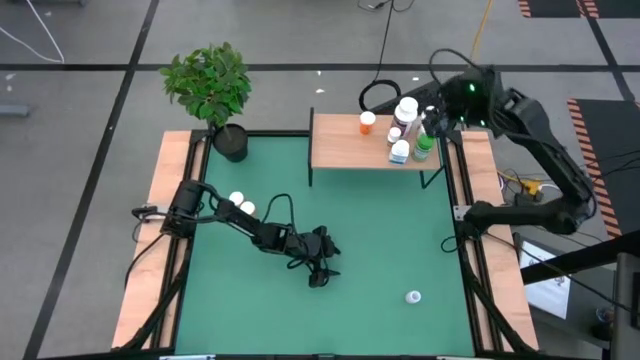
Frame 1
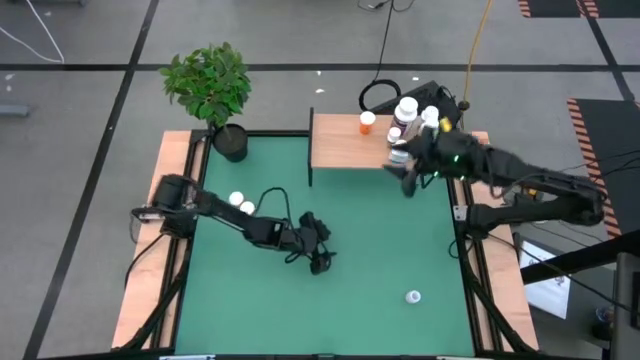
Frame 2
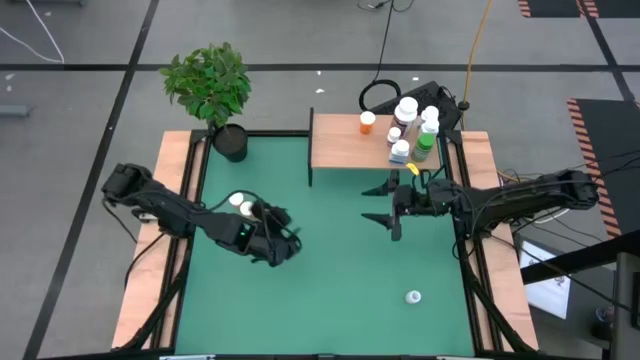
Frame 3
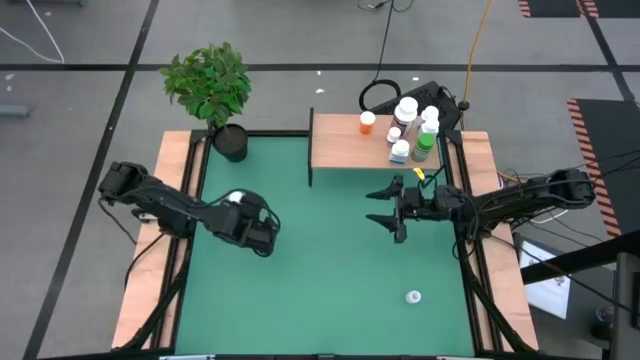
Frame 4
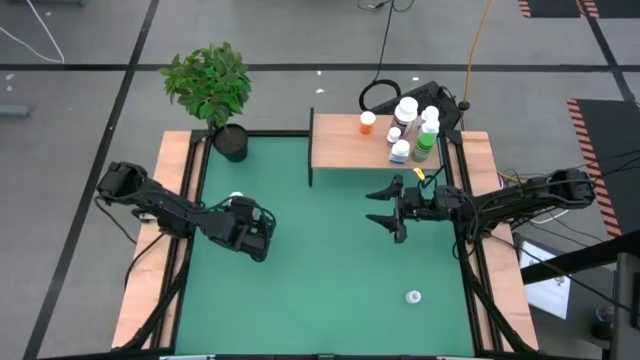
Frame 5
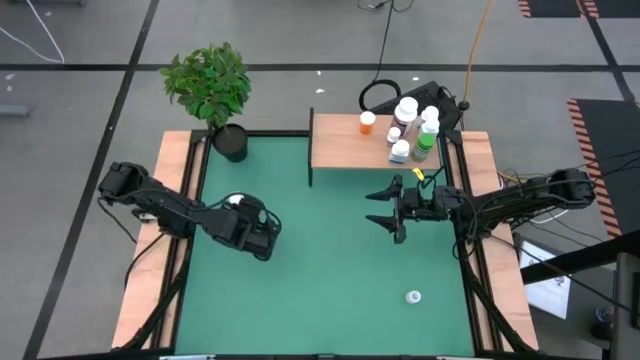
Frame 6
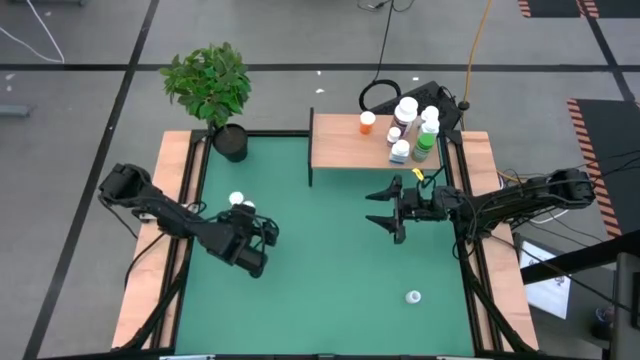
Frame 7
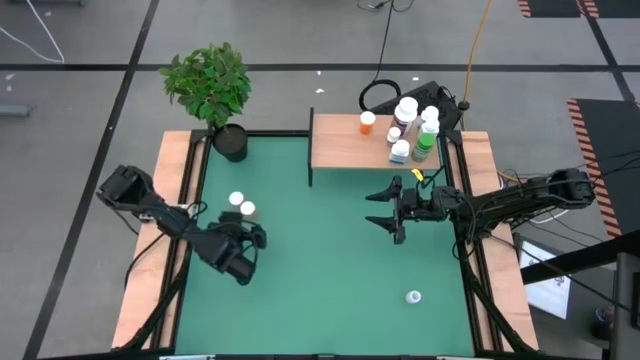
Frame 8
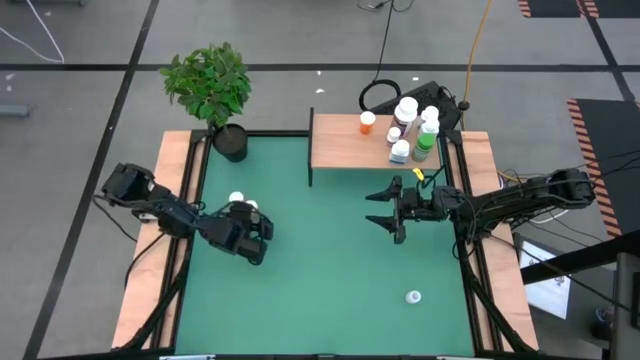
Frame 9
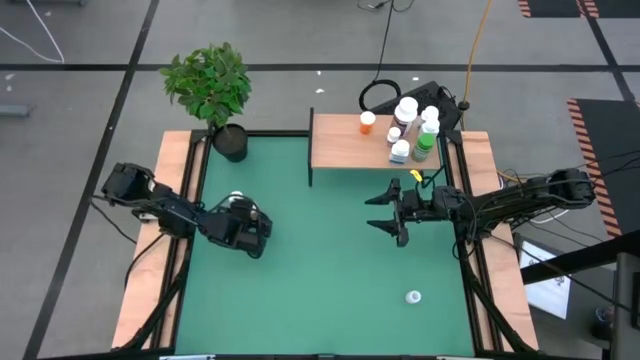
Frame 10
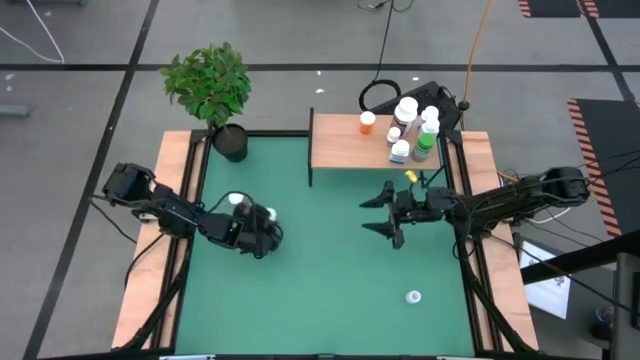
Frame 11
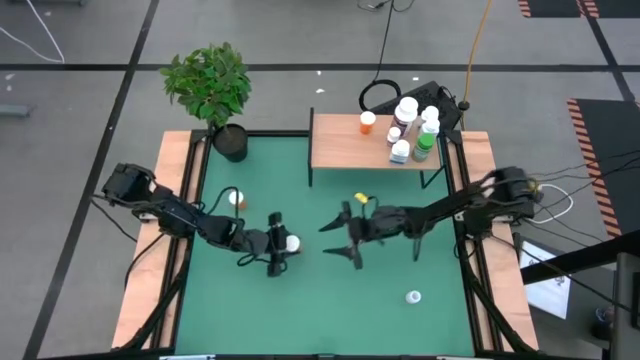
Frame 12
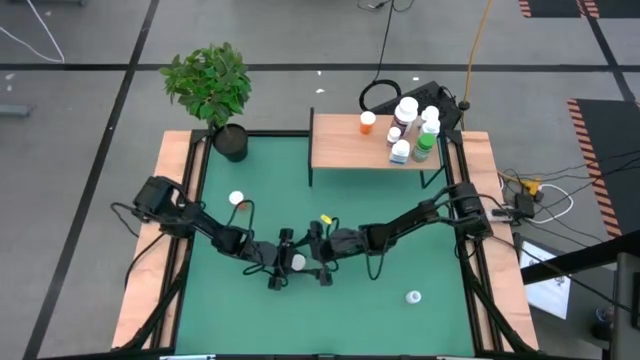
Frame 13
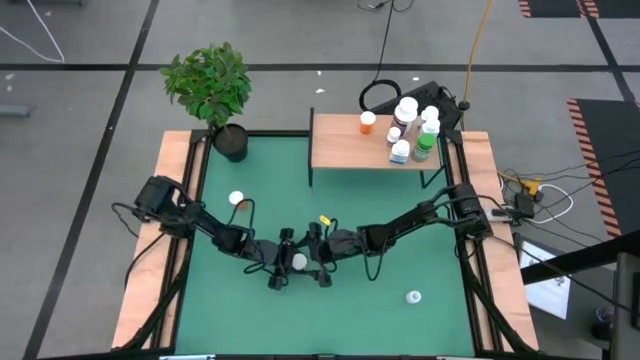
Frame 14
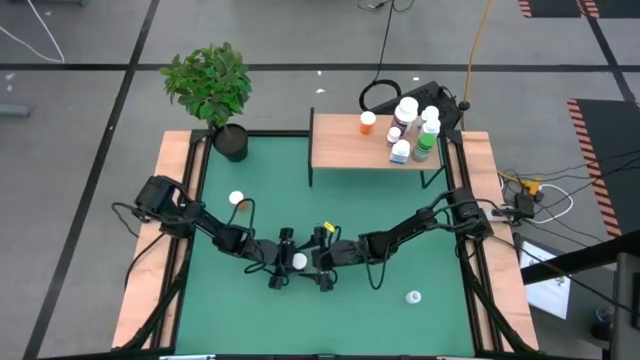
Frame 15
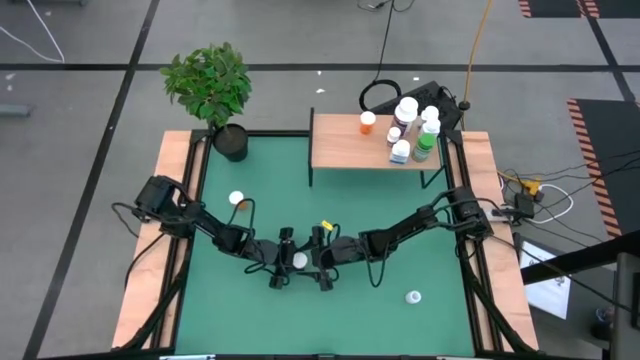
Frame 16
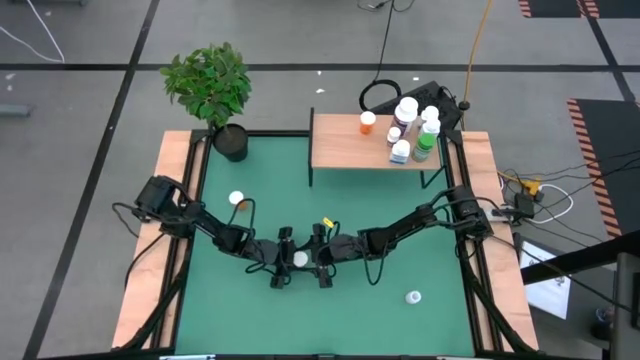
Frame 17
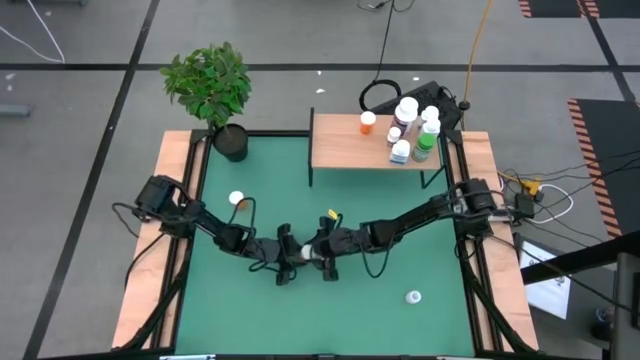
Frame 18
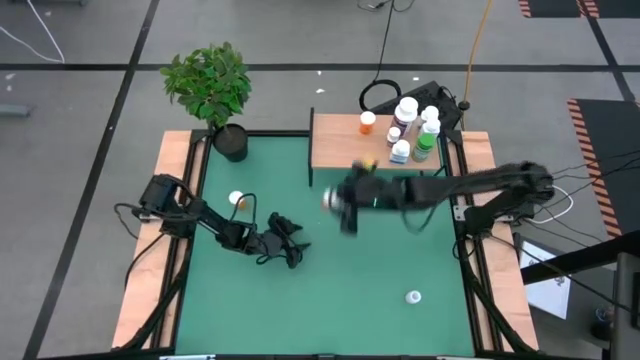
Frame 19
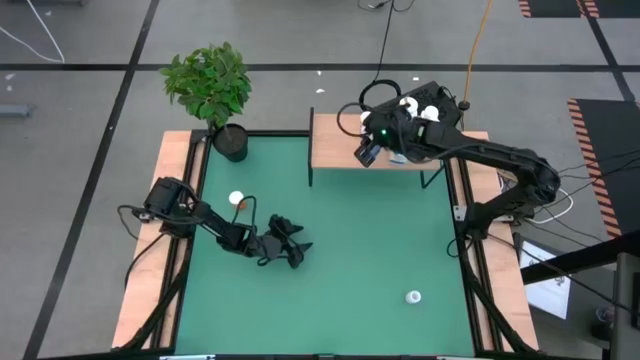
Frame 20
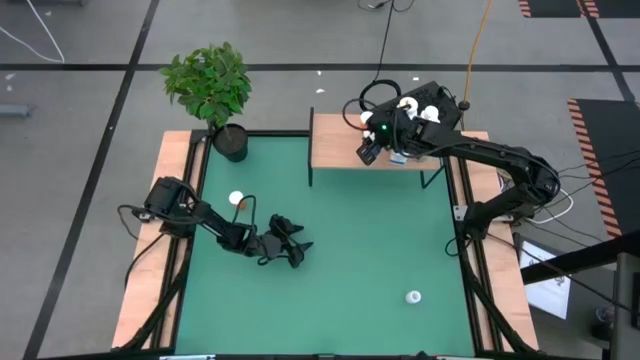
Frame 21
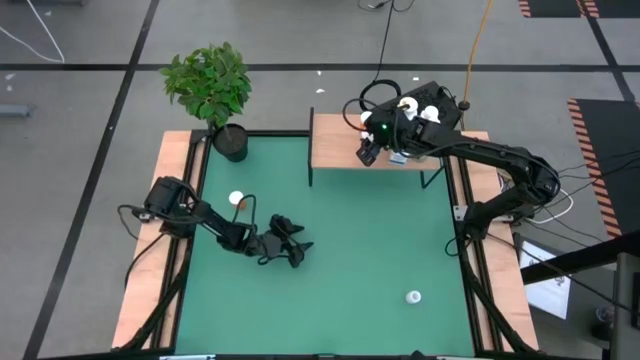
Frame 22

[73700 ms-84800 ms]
Task: Pick and place medicine bottles onto shelf by color
Put the bottom orange pill bottle on the shelf aligned with the other orange pill bottle

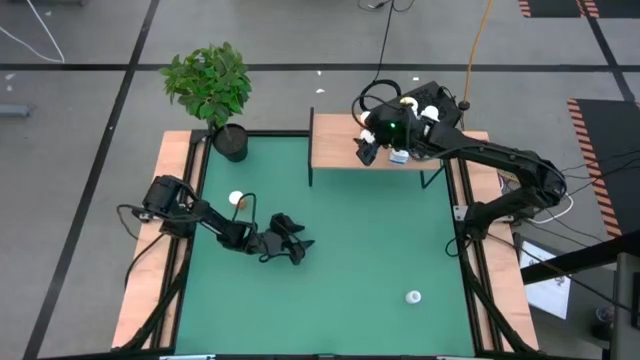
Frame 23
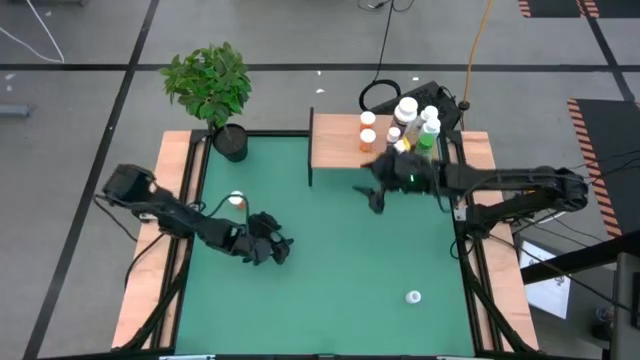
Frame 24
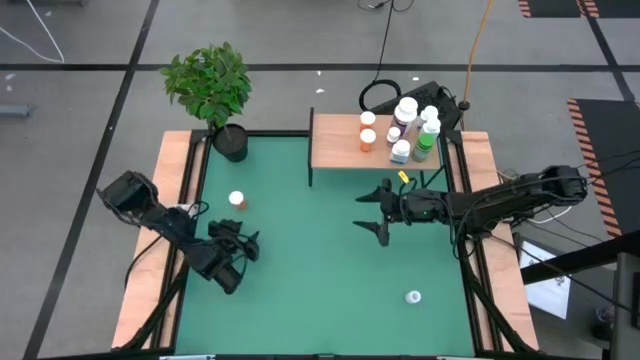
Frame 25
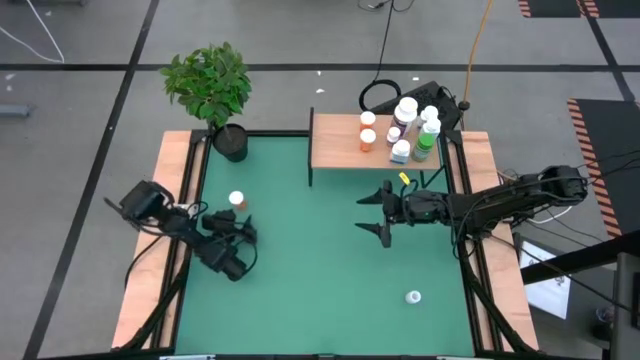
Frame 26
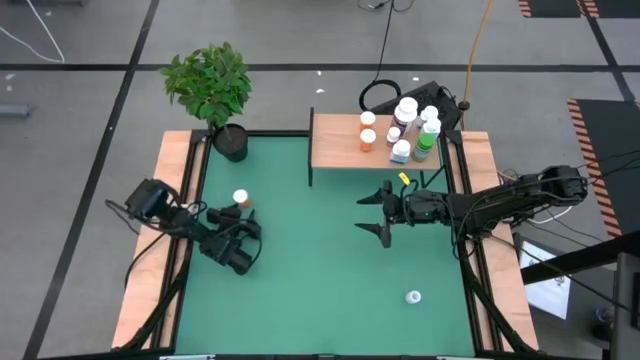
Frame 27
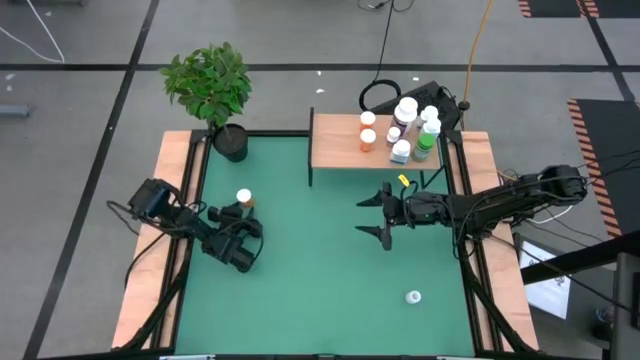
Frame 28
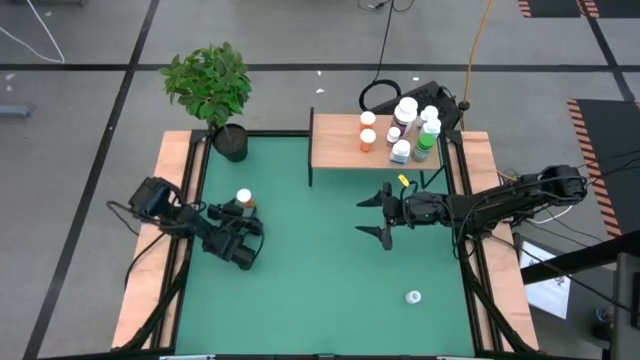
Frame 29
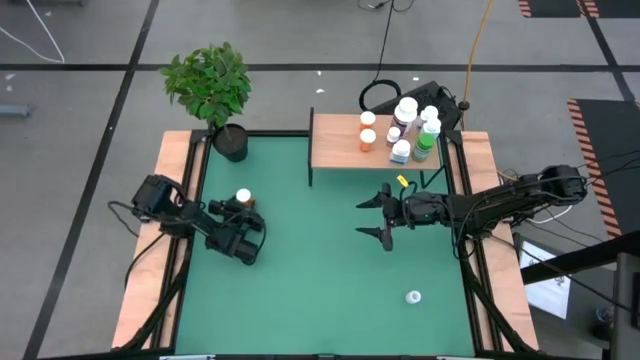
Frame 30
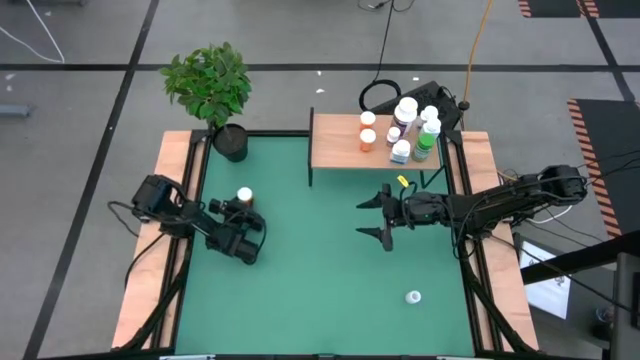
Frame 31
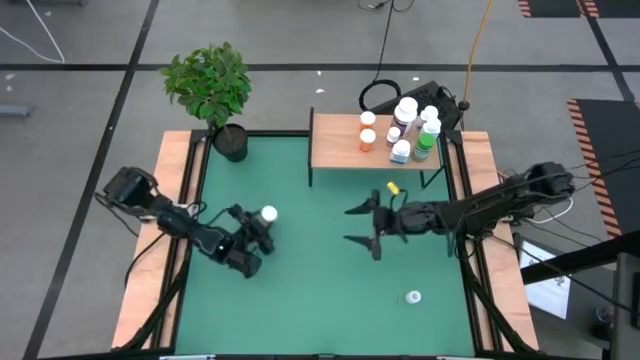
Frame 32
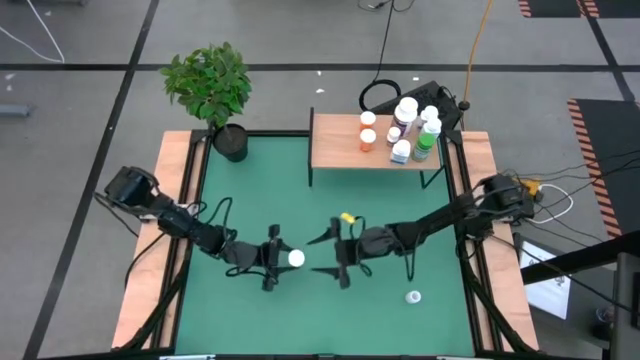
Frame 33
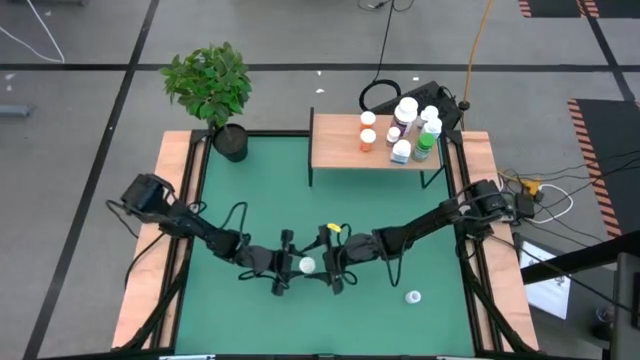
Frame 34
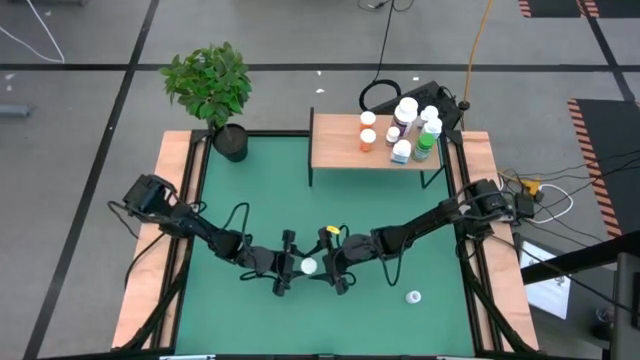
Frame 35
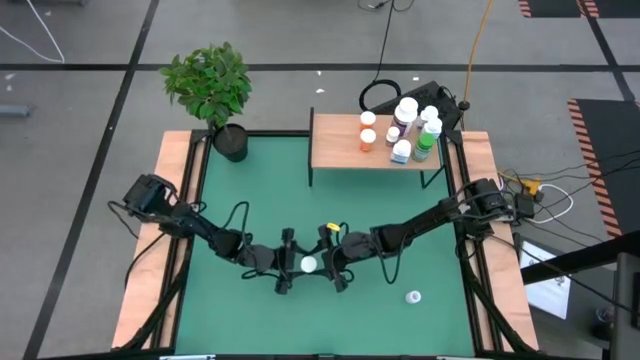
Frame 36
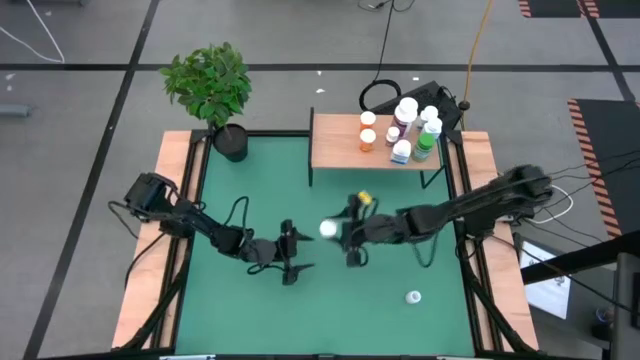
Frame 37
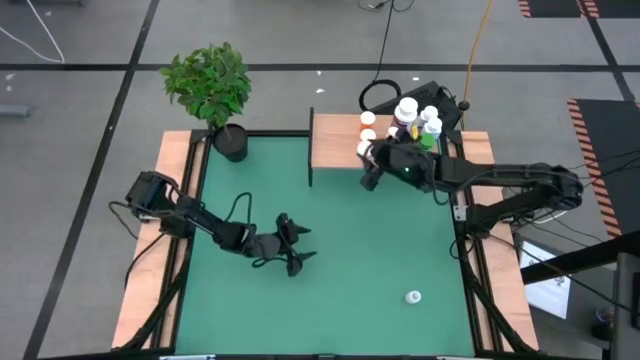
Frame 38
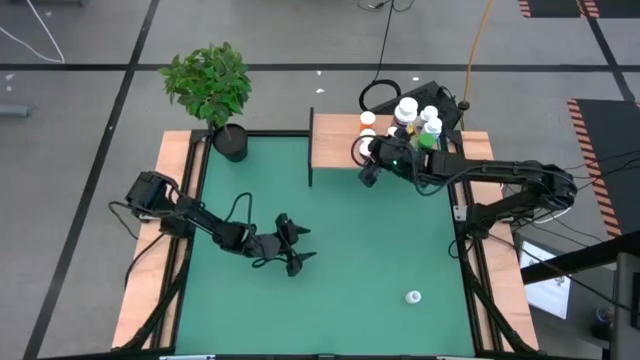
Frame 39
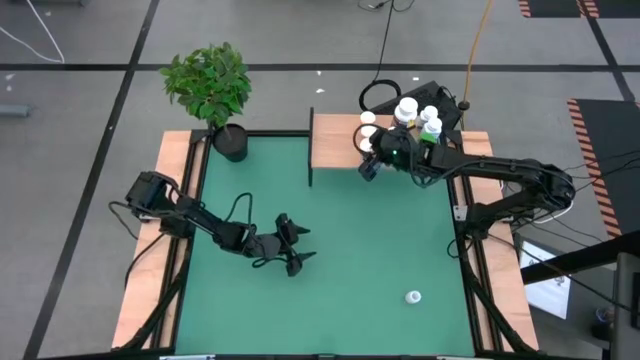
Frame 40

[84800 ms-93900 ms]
Put the orange pill bottle on the shelf aligned with the other orange pill bottles

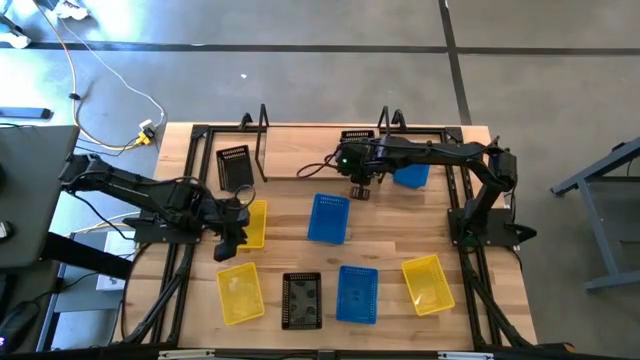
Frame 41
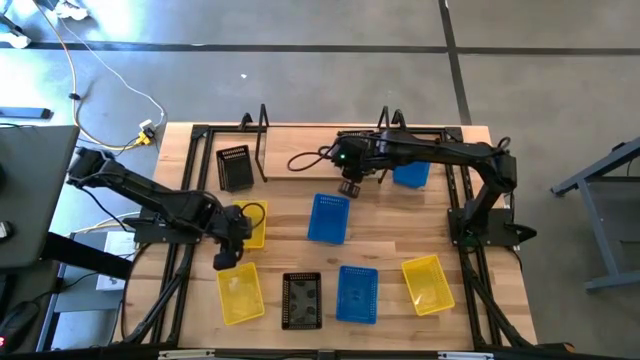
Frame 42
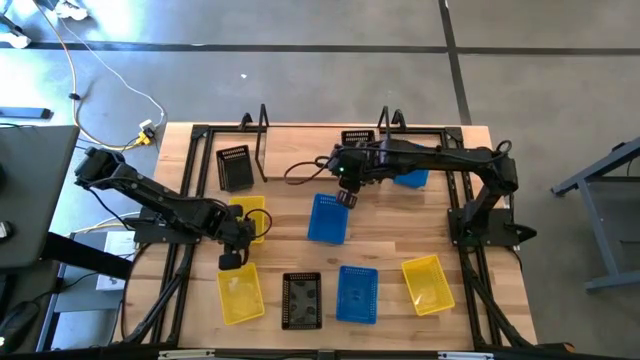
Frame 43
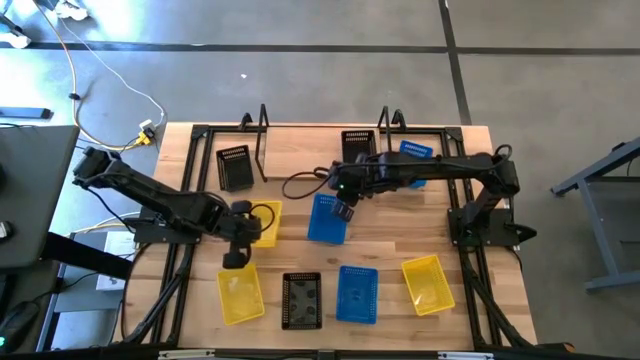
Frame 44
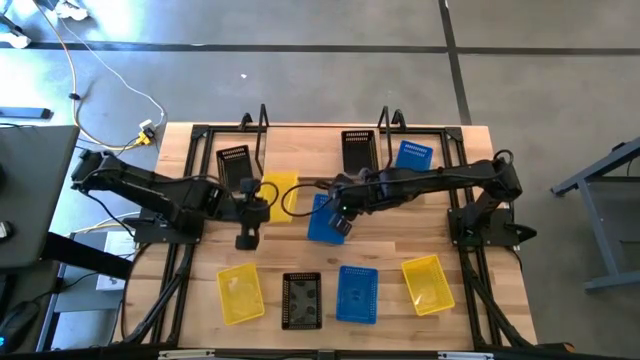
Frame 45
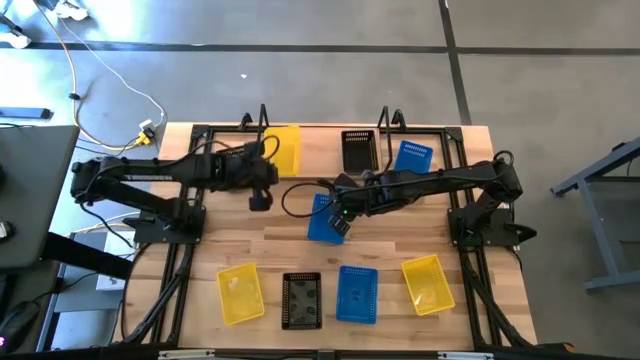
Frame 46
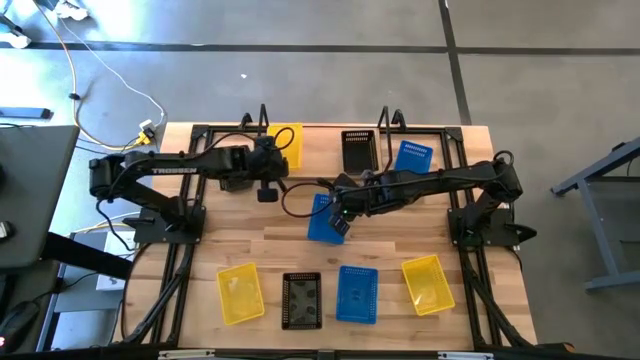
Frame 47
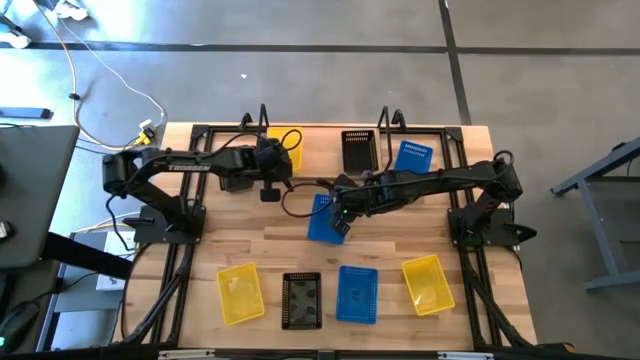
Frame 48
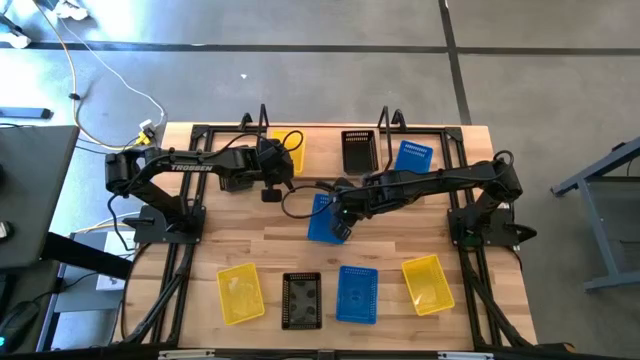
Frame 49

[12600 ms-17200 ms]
Task: Stack baskets on shelf by color
Put the top left yellow basket on the shelf
